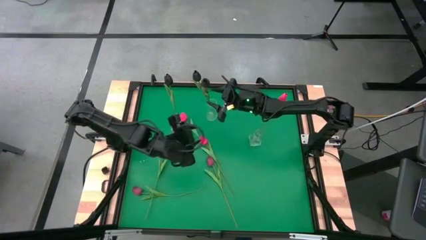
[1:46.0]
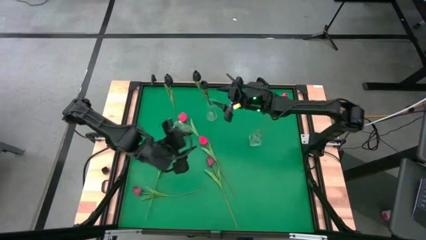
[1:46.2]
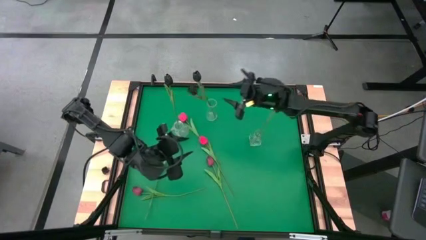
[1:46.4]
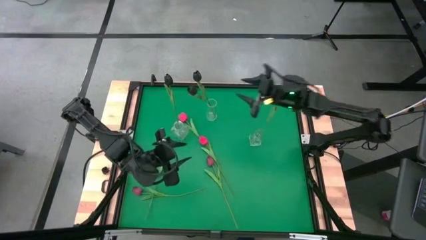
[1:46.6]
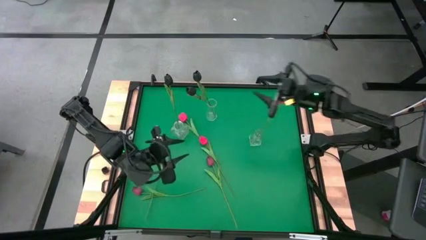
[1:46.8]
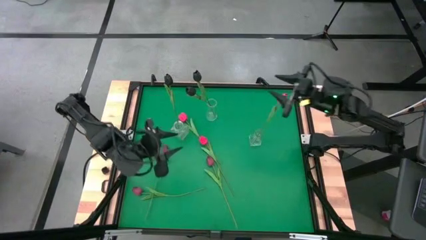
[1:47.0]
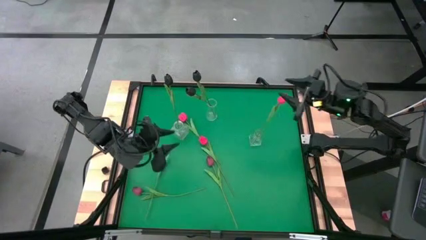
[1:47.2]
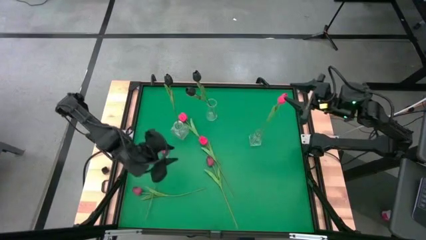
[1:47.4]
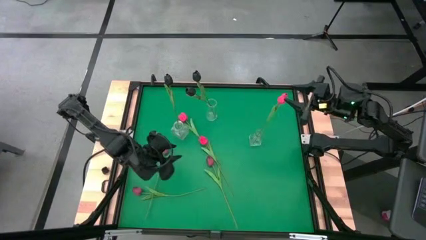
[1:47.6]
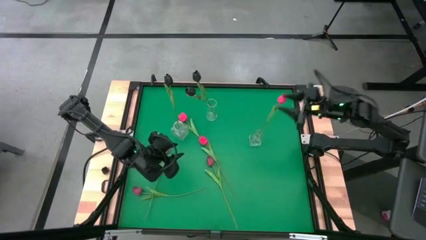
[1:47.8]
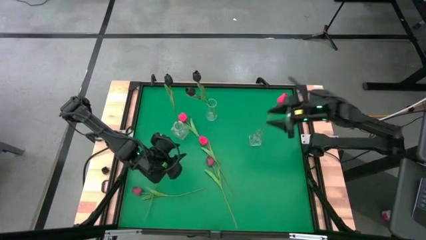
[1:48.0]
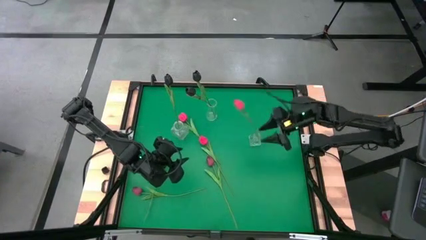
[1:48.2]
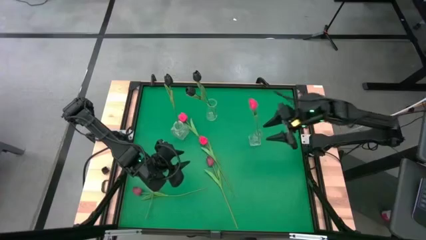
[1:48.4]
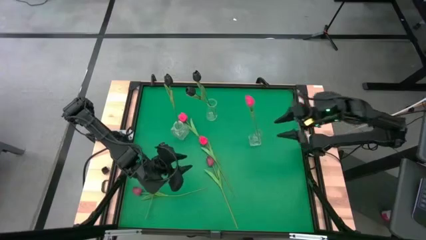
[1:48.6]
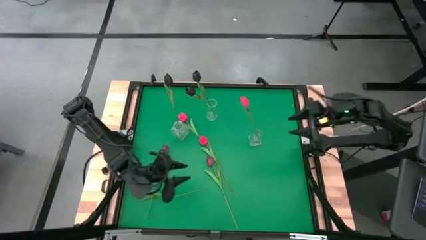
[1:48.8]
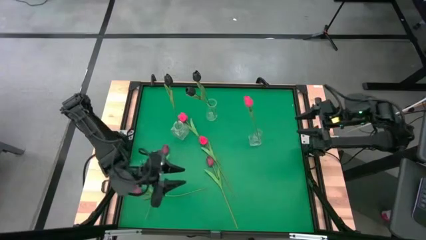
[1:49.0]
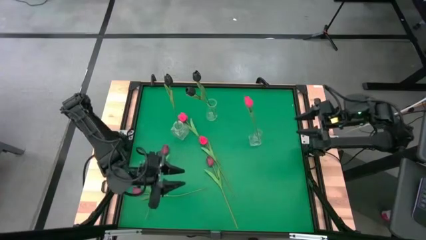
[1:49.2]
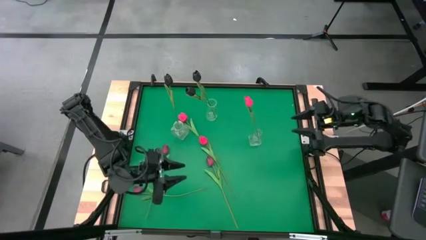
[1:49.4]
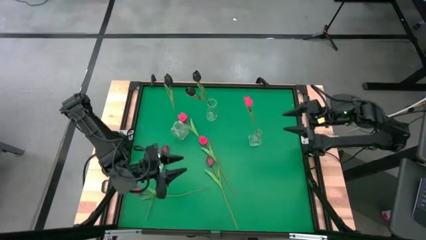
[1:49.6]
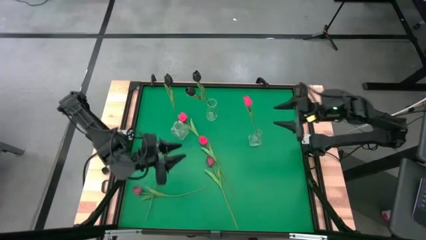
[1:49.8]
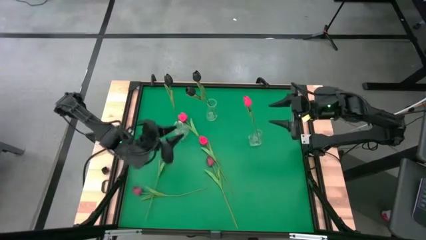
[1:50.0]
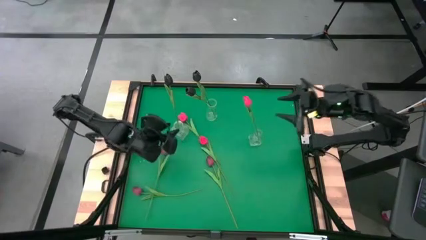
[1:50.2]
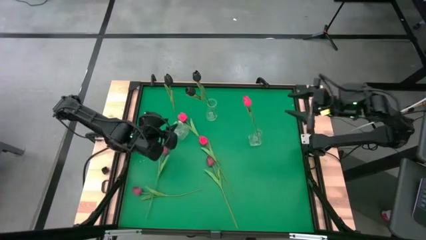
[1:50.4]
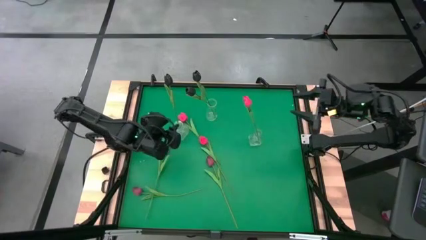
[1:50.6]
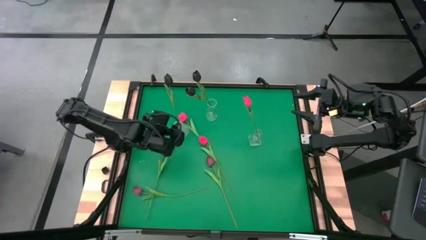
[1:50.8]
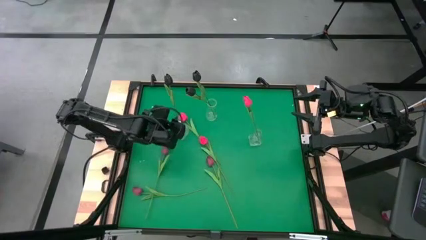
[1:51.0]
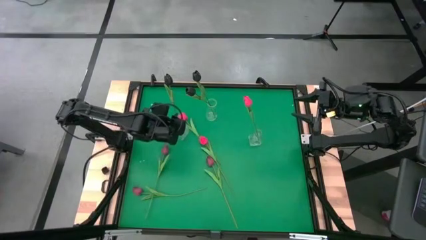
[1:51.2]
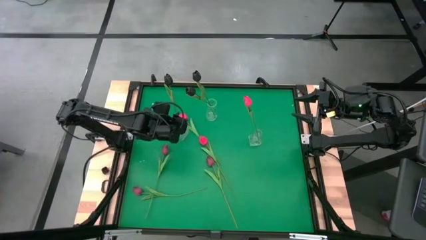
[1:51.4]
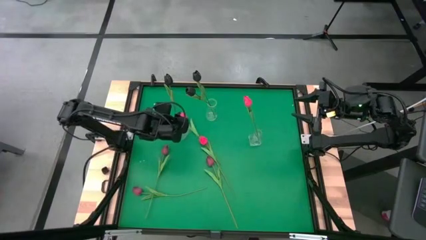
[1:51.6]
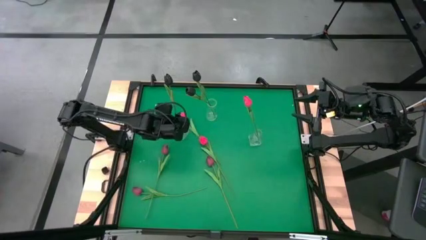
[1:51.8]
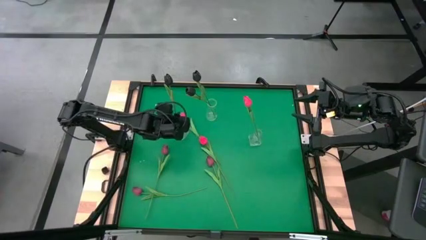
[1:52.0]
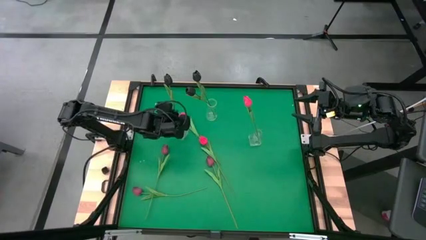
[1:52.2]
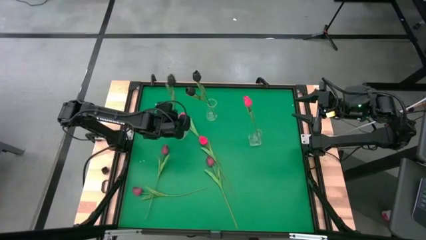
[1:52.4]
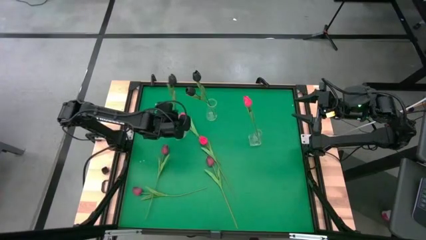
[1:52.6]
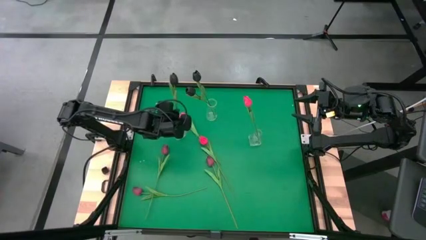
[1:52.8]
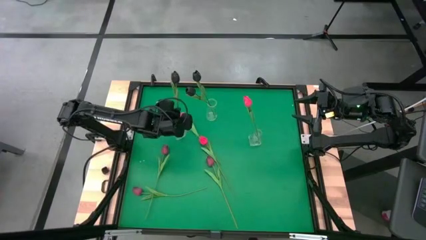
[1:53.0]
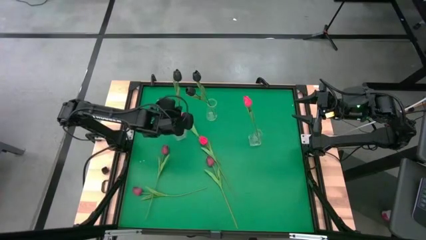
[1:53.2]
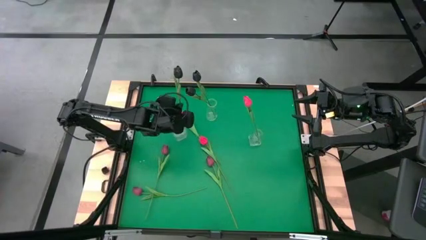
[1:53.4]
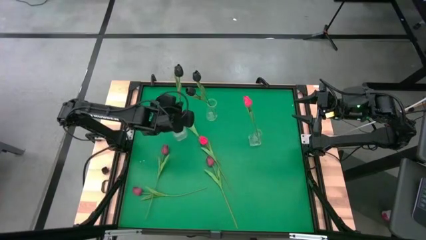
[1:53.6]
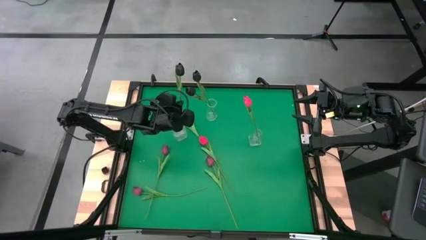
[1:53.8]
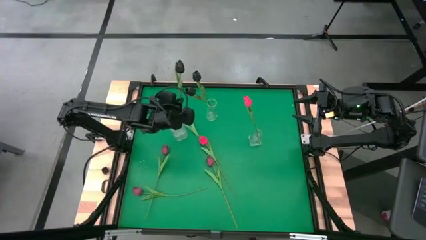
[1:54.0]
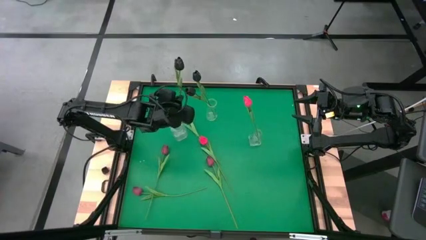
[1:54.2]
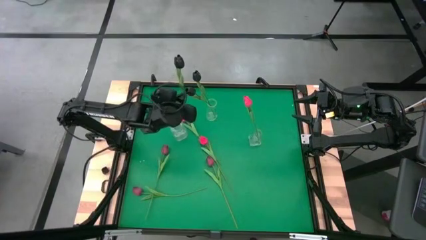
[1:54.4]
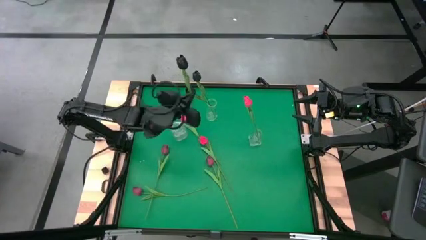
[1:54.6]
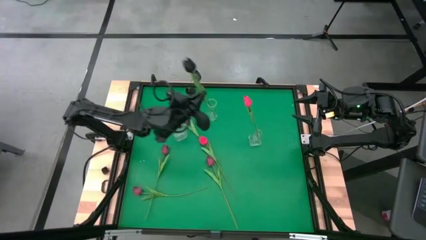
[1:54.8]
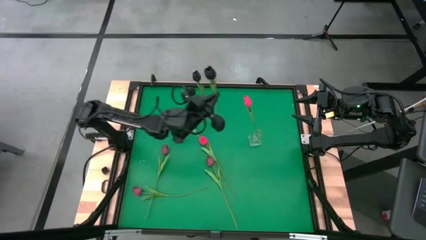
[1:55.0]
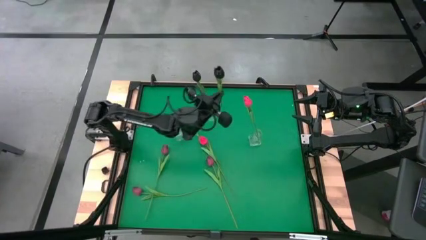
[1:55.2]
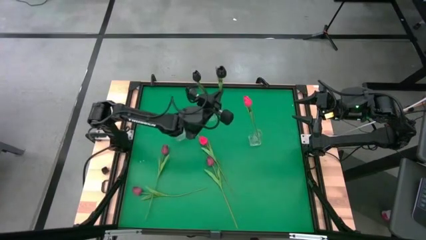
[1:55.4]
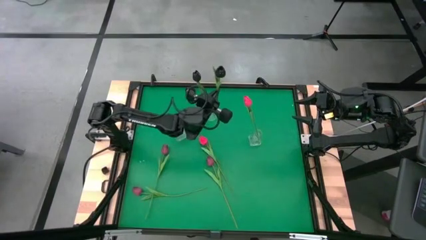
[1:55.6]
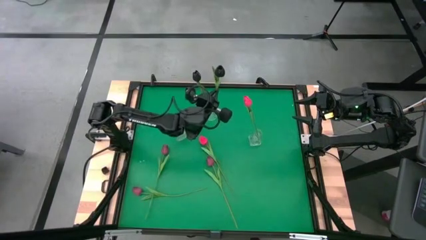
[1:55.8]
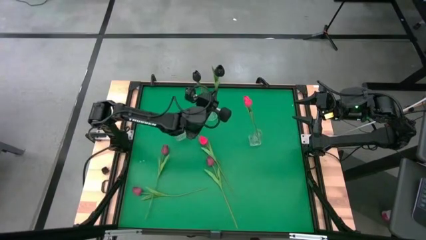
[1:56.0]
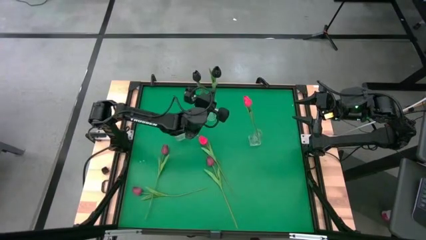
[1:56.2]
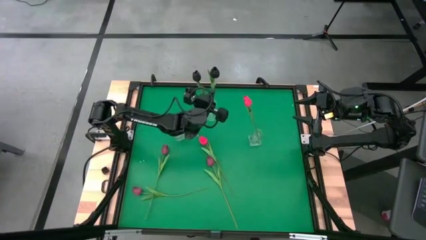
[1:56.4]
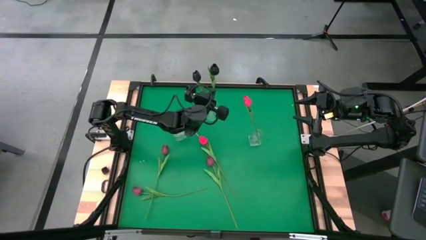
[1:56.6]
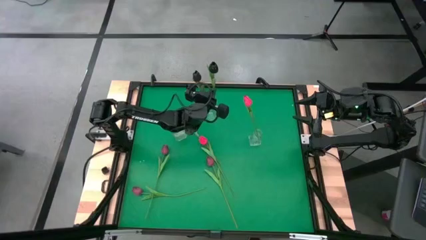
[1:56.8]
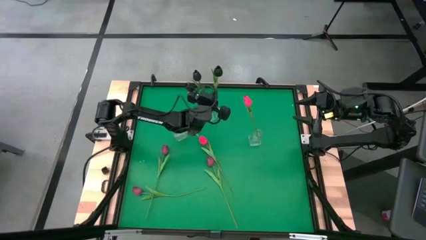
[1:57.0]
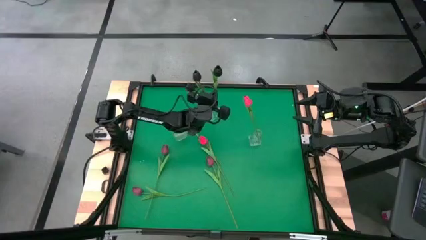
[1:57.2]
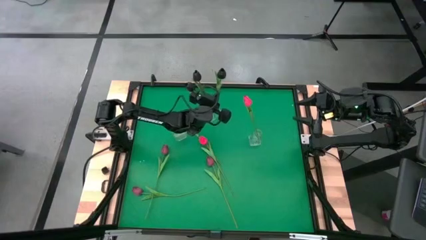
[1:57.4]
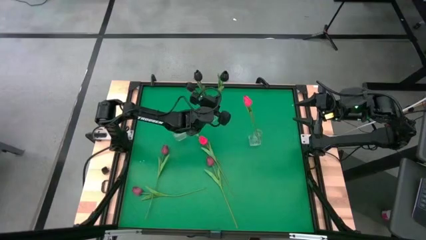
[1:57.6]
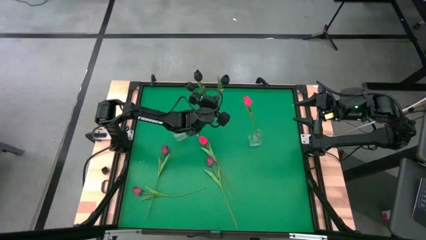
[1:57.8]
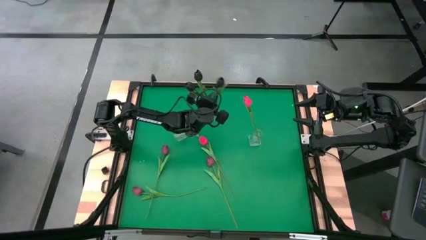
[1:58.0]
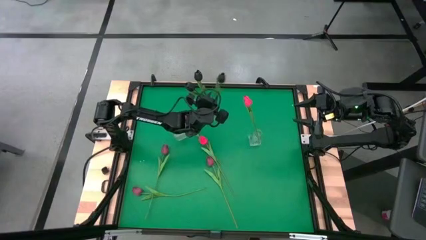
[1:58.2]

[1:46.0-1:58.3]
Task: Sort flowers into vase by color
Put the black tulip into the top transparent vase

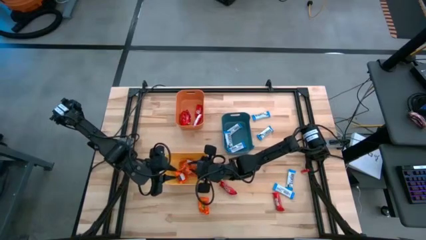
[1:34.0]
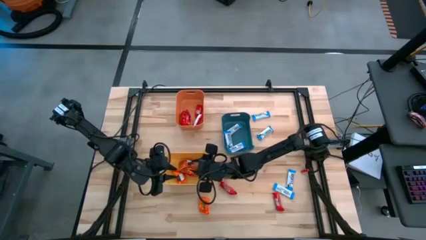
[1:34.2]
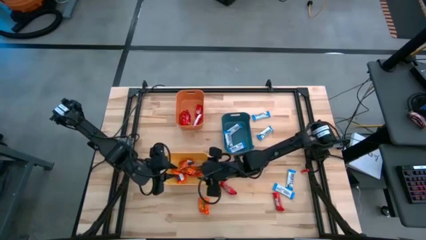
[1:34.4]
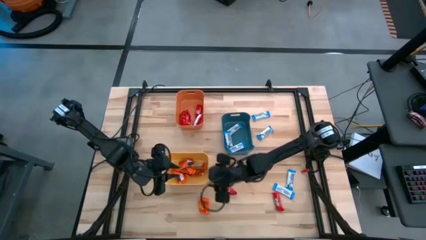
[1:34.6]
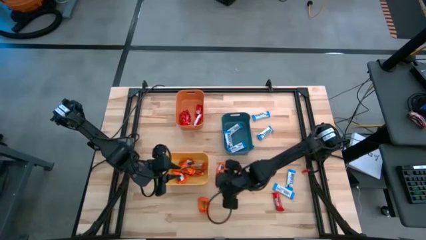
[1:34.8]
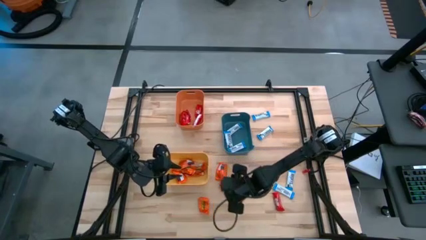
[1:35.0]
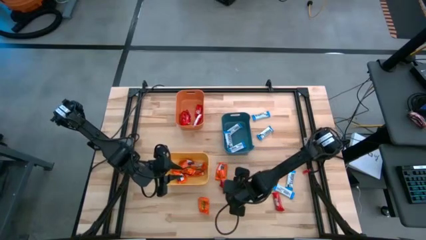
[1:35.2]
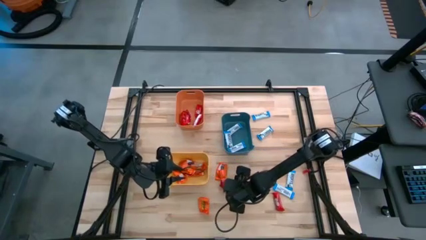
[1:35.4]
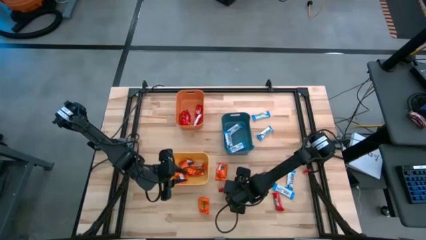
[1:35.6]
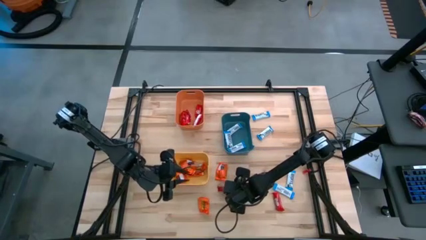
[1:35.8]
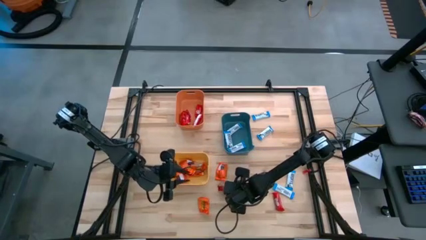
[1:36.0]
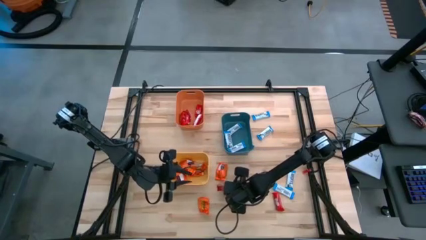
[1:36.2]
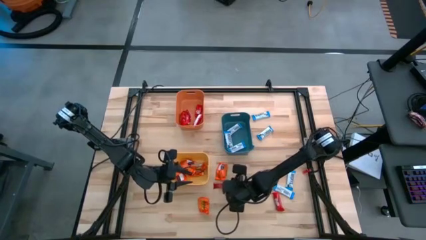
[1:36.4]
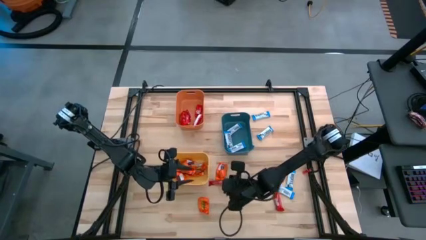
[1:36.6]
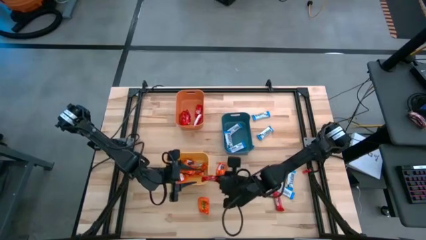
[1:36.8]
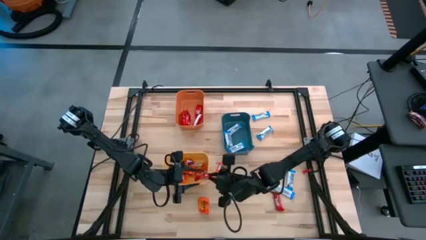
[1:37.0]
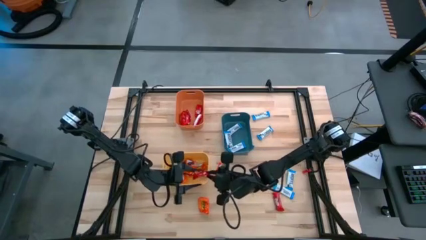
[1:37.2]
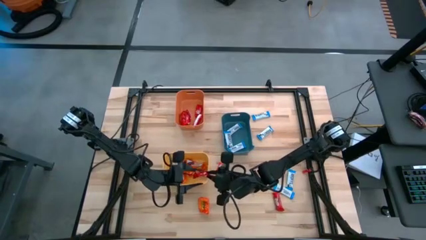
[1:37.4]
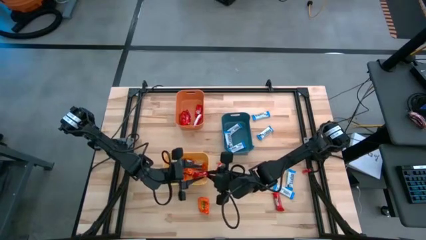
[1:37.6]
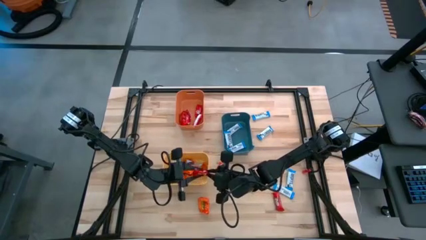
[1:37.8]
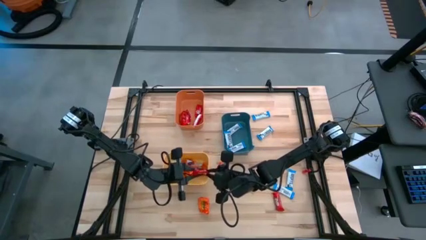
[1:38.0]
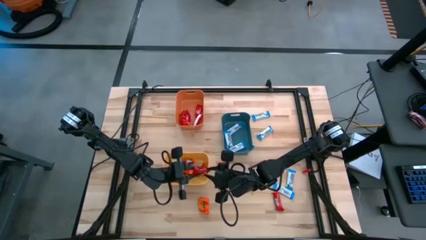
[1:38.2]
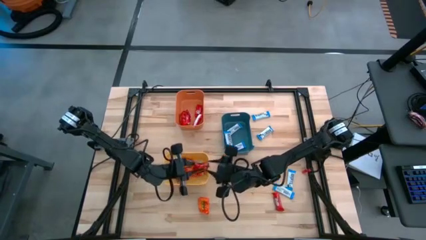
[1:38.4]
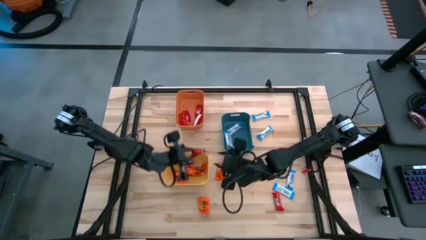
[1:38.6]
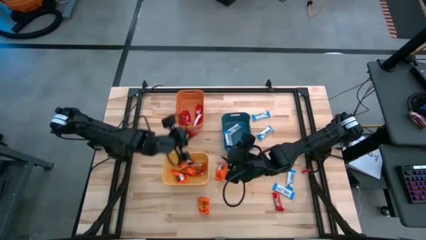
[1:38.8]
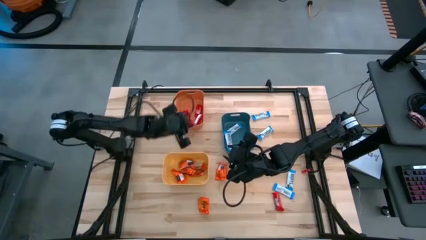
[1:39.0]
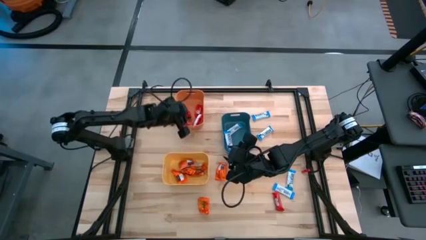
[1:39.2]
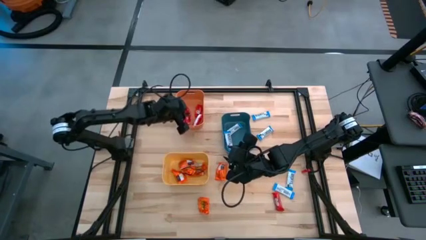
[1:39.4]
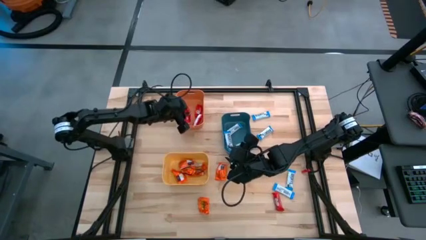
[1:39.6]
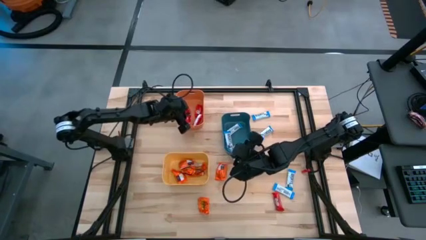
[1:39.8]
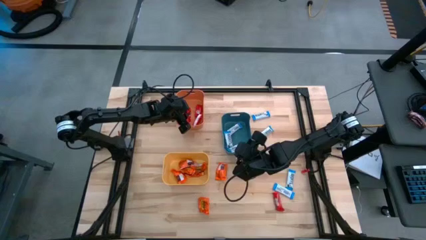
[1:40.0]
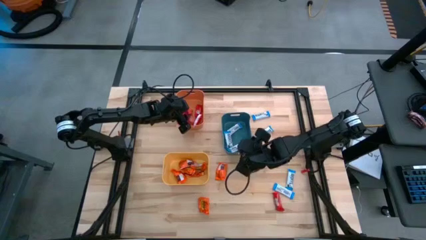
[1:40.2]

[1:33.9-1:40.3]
Task: Organize candy in baskets
Put the red chocolate into the orange bin
